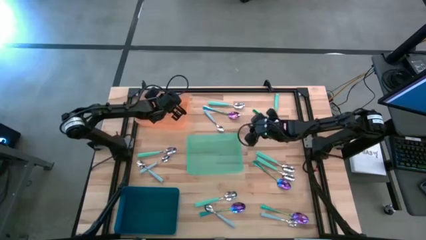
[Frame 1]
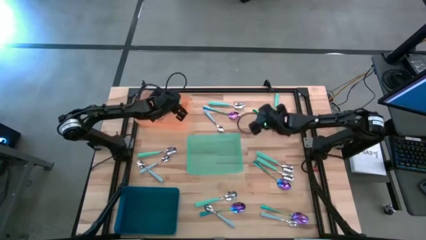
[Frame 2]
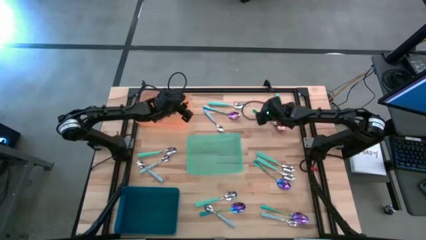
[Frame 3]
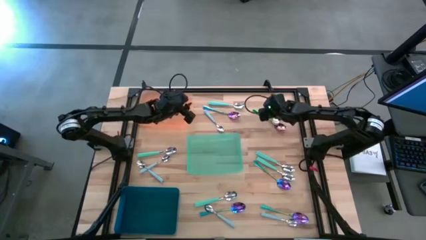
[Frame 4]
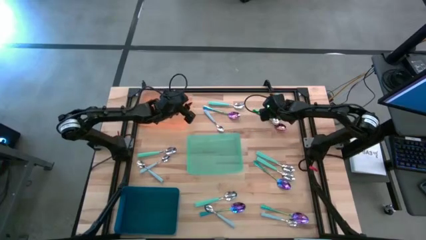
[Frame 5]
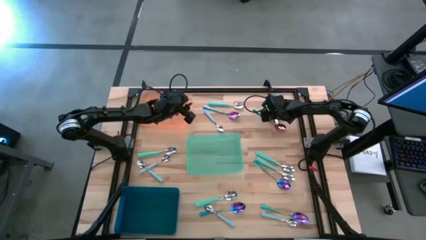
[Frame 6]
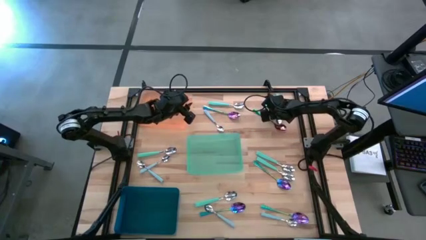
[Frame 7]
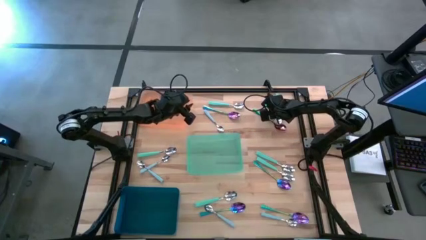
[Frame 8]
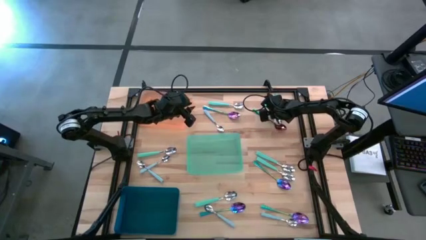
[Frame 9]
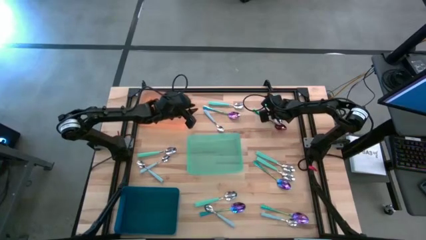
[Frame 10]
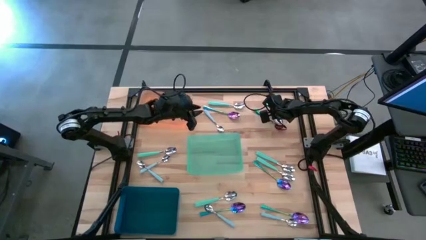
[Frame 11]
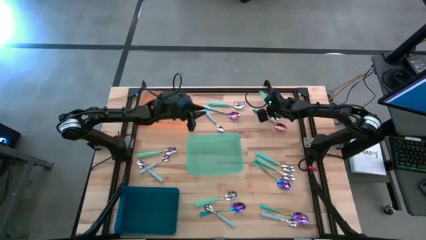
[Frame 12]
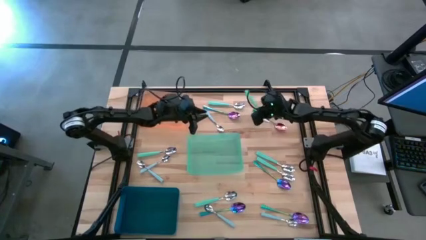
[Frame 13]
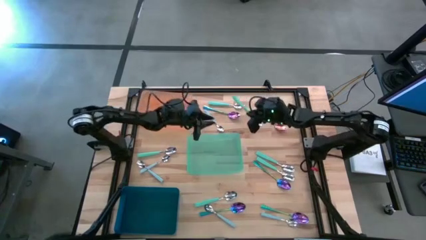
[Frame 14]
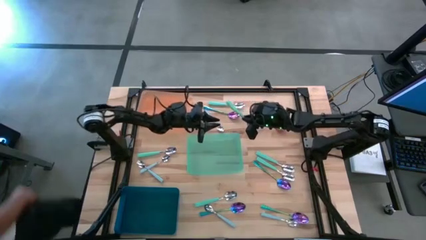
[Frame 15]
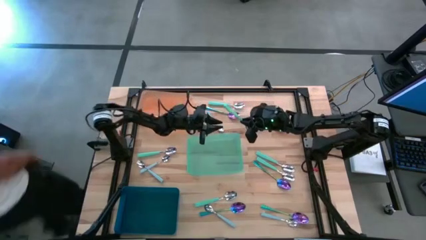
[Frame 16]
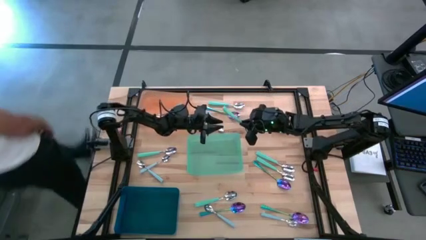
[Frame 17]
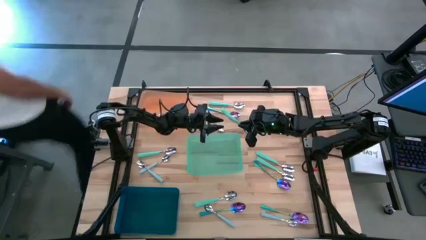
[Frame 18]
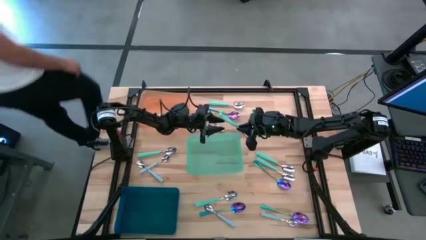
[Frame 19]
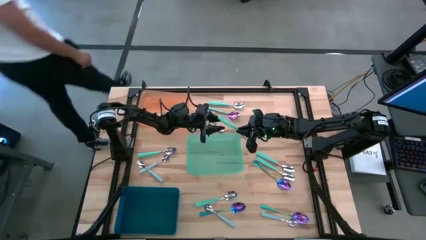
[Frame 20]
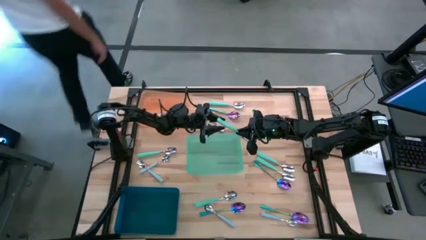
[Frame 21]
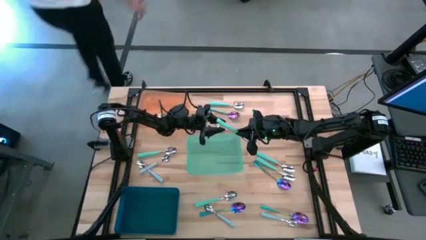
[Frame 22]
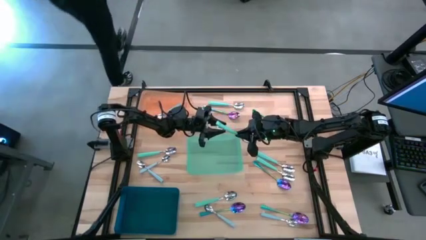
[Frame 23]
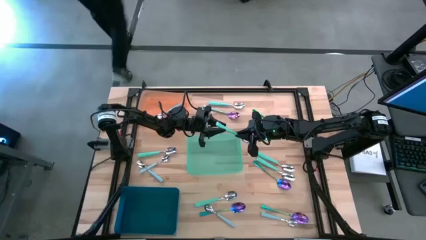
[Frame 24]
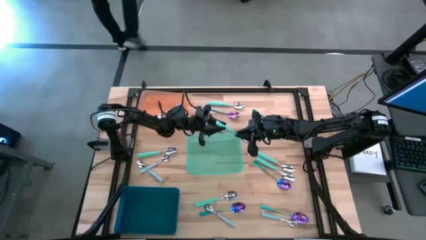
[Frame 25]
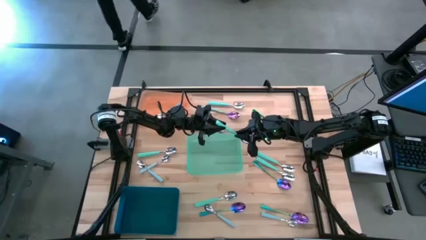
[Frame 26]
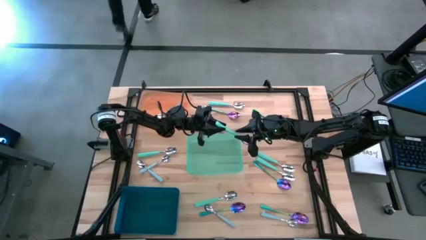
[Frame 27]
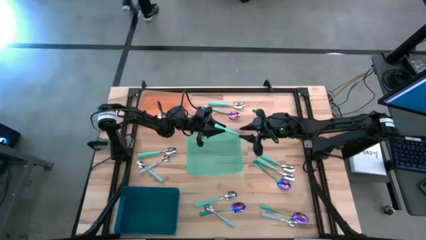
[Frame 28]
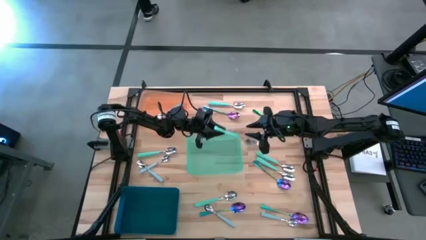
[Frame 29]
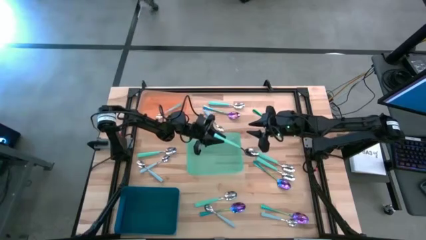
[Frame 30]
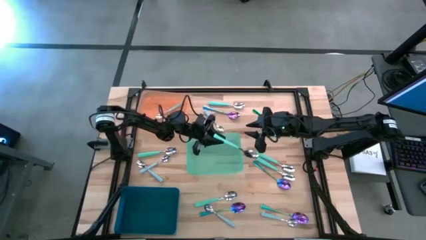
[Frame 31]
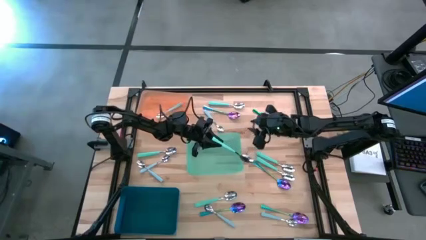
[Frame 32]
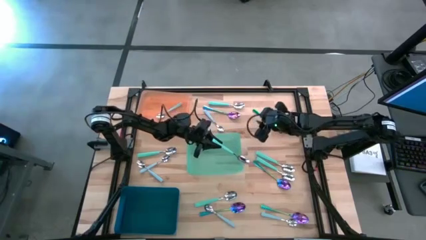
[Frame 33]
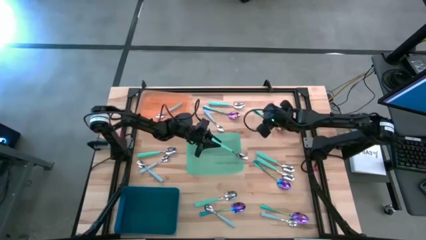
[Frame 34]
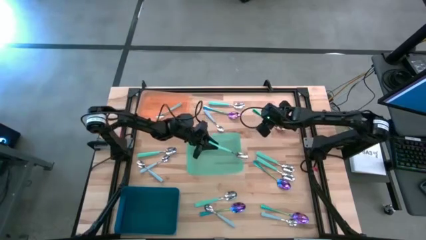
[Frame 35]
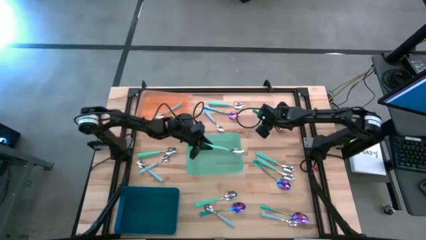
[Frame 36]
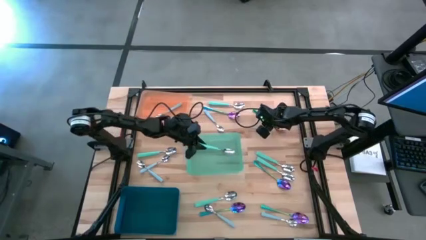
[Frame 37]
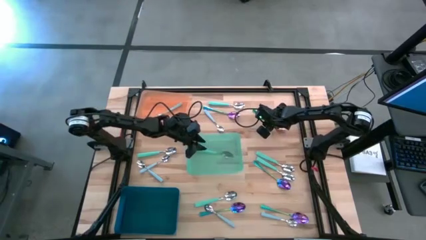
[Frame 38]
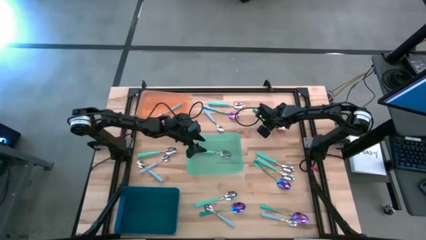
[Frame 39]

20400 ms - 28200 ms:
Task: Sort silverware by color (type)
Put the green spoon into the green bin

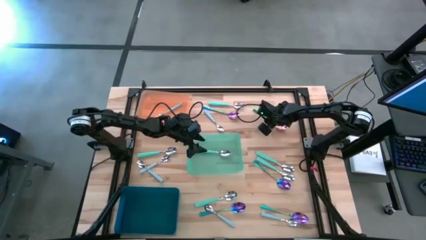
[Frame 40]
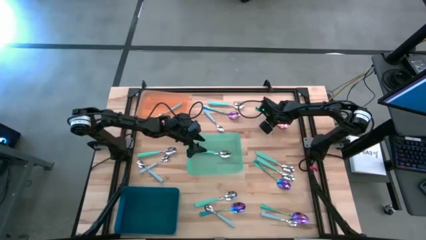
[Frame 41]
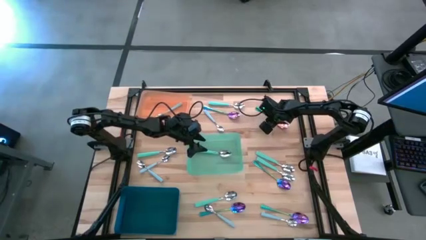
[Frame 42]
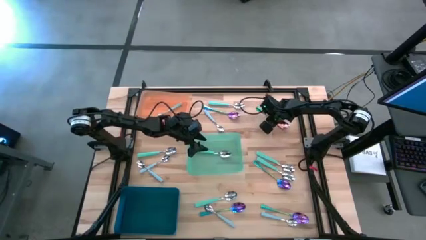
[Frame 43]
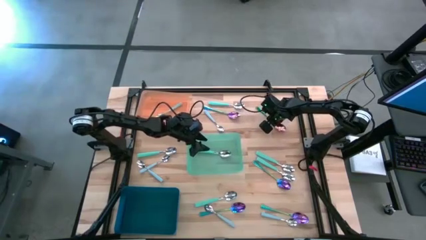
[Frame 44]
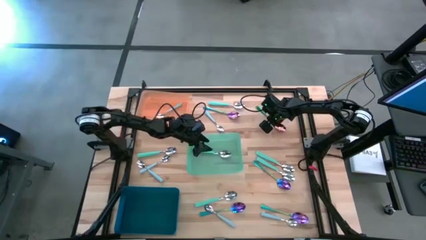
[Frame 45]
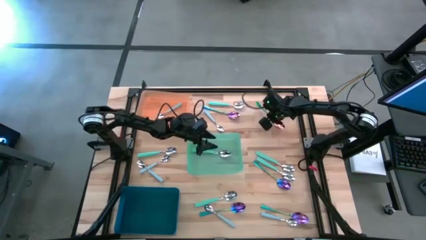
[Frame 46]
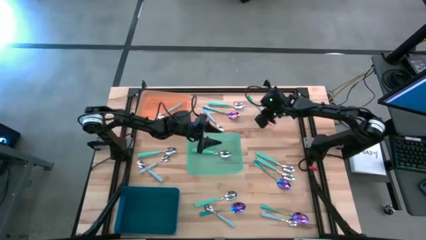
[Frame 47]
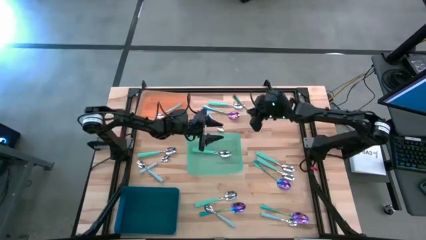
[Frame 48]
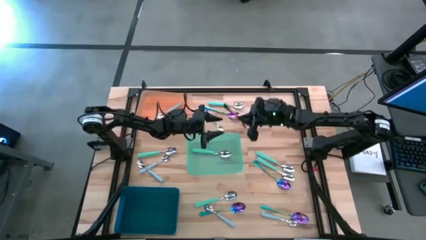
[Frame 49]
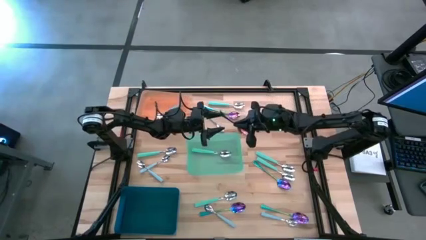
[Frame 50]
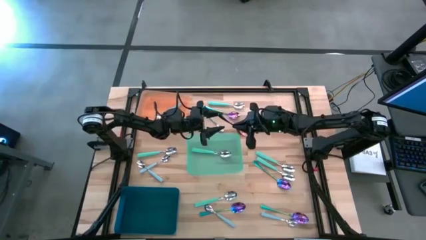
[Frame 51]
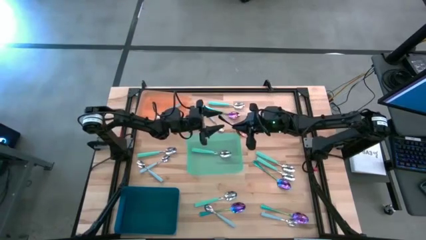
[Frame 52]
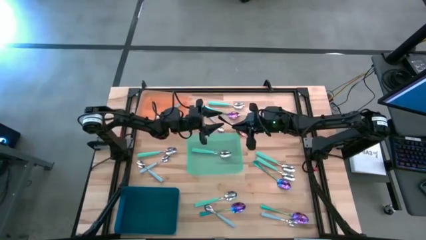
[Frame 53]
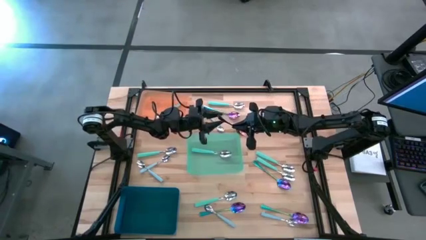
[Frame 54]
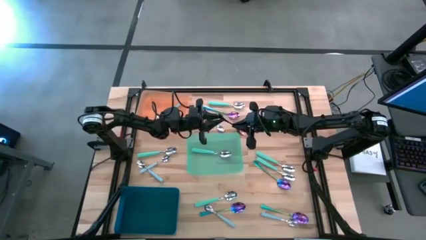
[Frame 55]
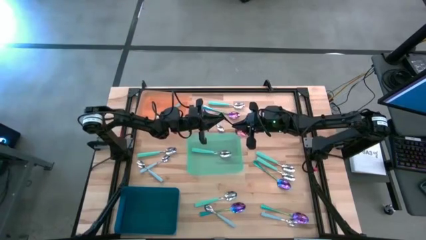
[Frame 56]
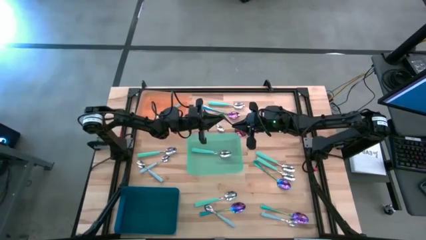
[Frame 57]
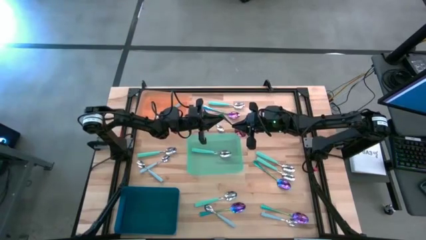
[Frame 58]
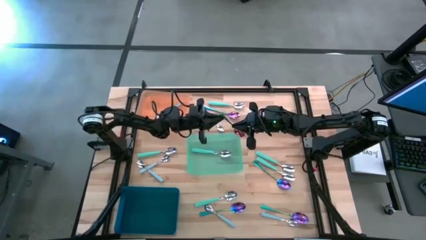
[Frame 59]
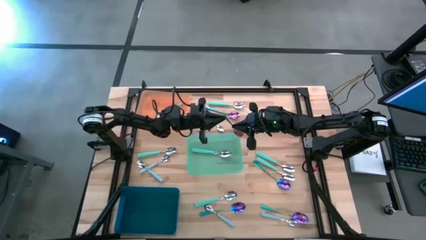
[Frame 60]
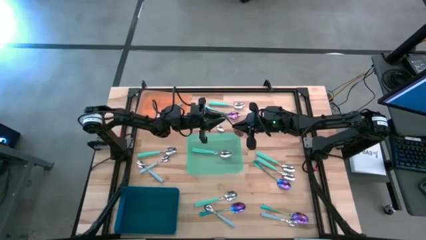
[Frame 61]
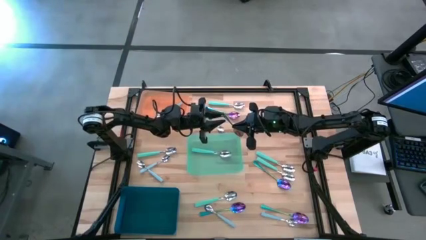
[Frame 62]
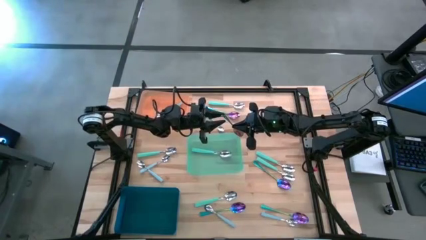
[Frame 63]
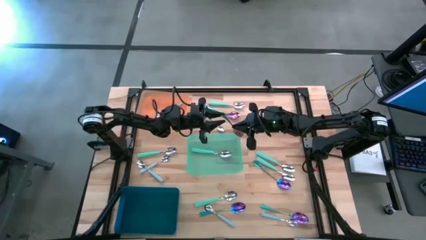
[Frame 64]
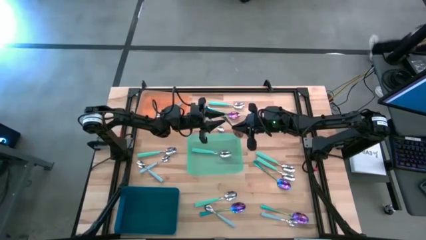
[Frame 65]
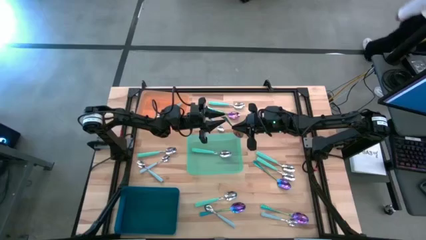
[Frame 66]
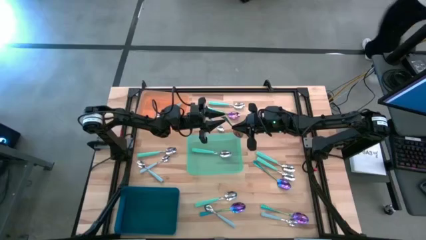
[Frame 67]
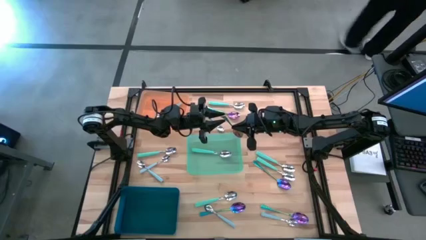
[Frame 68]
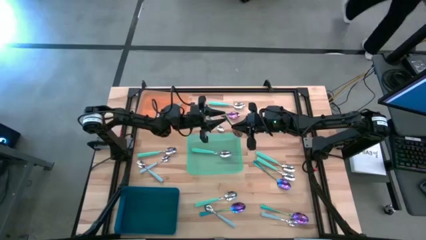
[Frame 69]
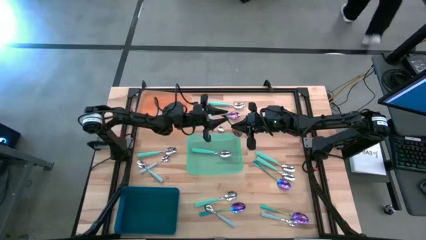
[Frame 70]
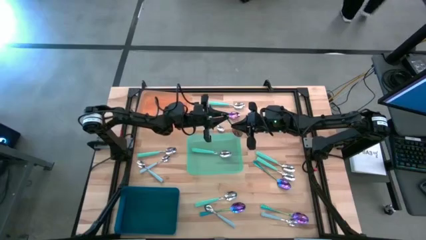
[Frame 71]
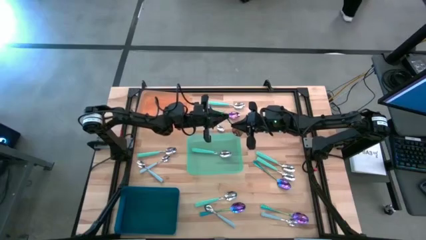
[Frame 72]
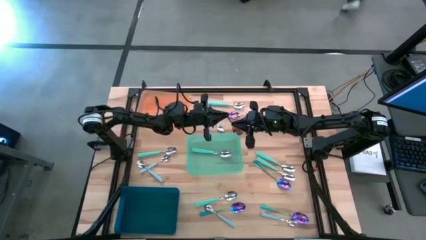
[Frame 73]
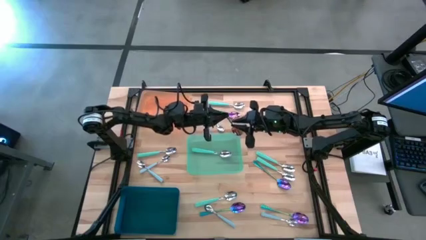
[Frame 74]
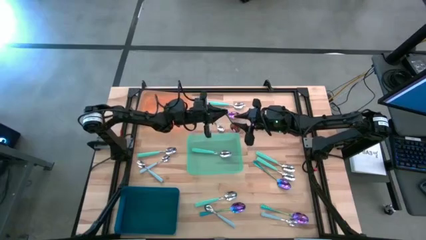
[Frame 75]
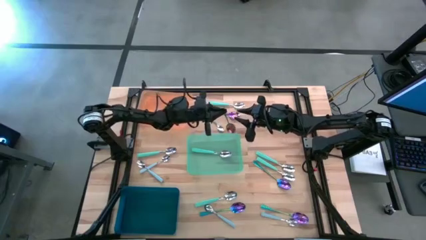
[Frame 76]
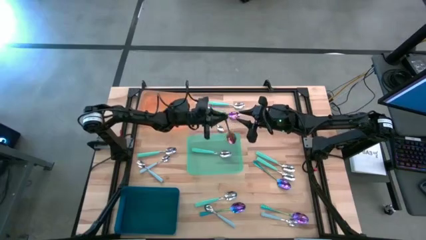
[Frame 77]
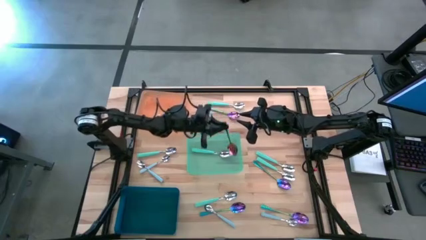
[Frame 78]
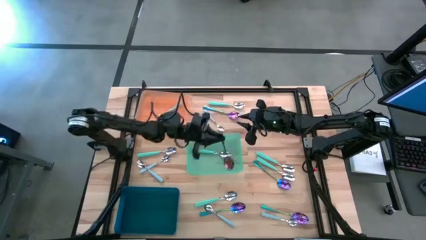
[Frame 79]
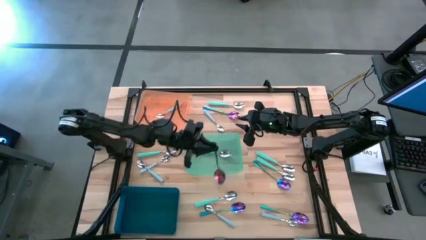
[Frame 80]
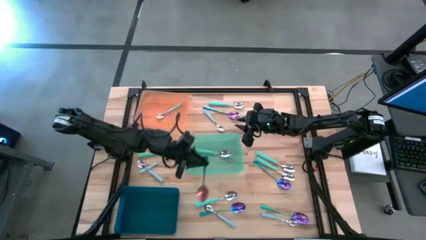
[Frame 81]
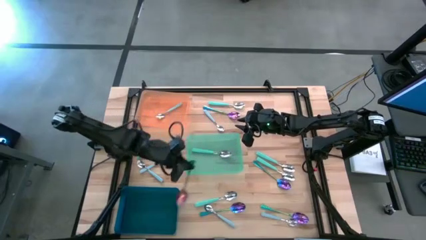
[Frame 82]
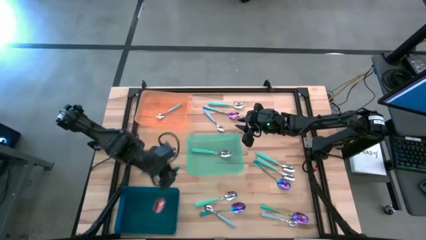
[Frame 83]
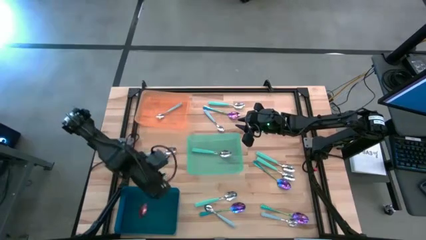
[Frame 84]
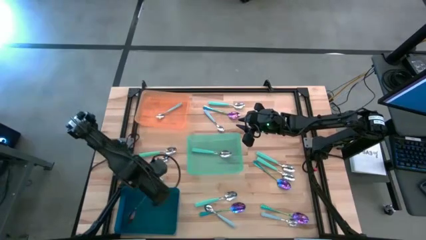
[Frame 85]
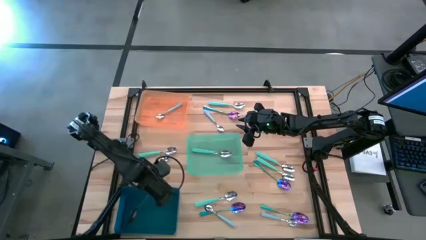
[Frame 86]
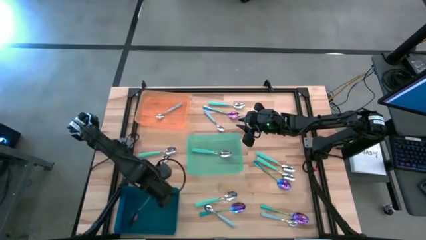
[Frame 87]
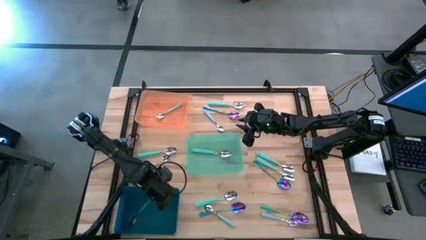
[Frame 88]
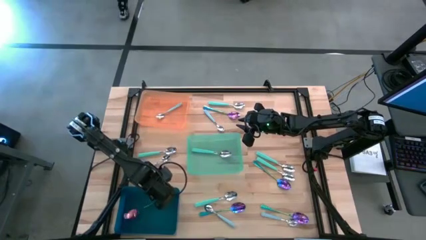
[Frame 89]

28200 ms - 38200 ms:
Put the iridescent spoon into the blue bin
